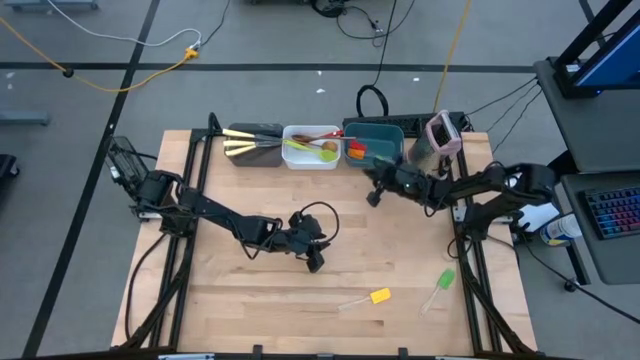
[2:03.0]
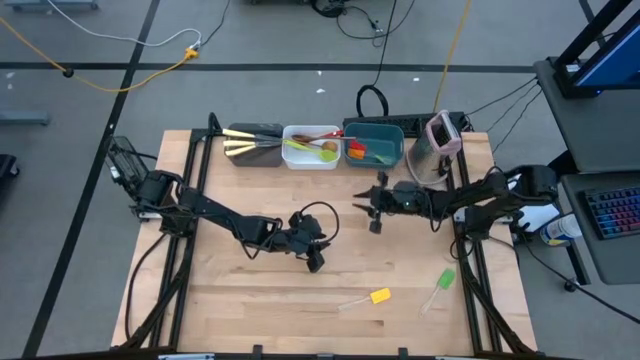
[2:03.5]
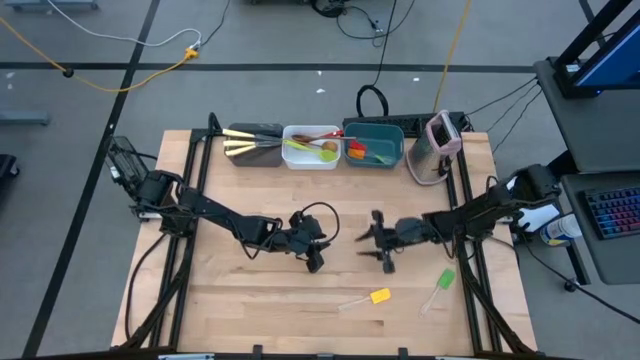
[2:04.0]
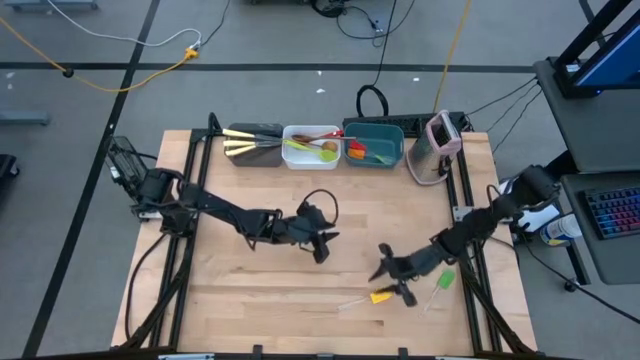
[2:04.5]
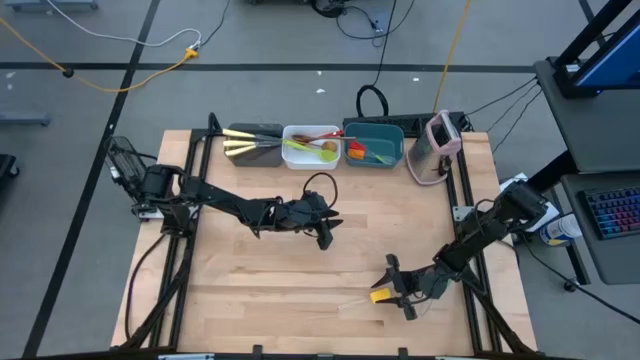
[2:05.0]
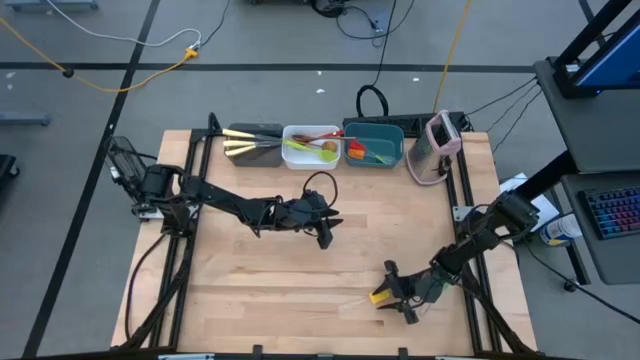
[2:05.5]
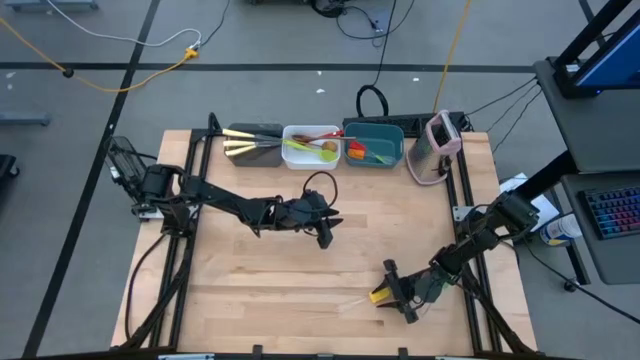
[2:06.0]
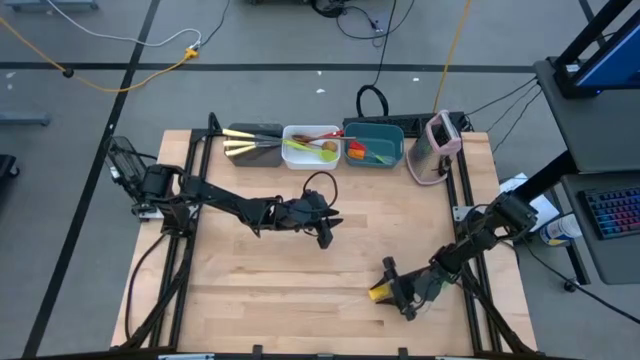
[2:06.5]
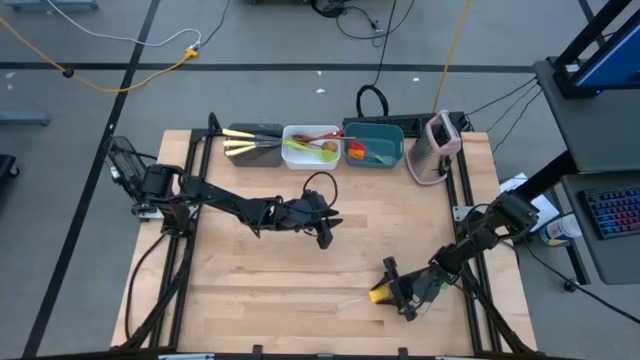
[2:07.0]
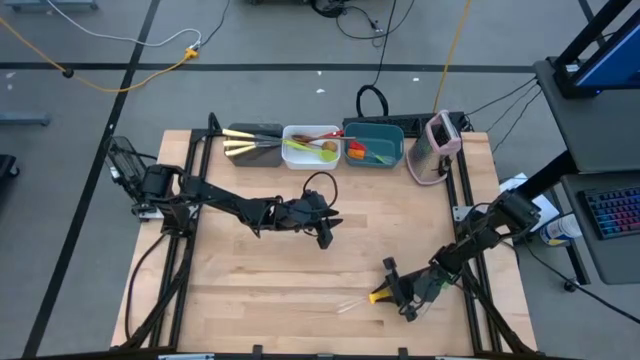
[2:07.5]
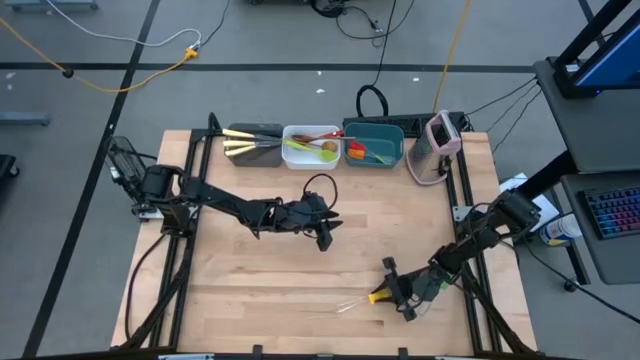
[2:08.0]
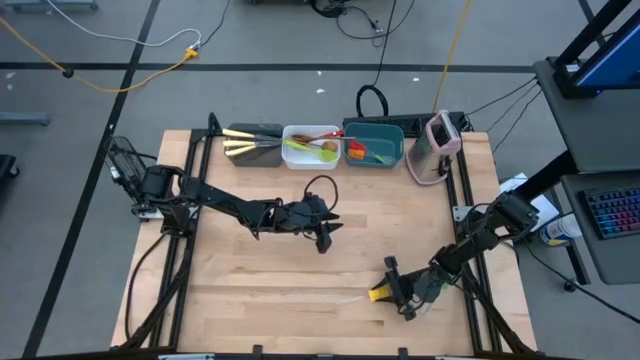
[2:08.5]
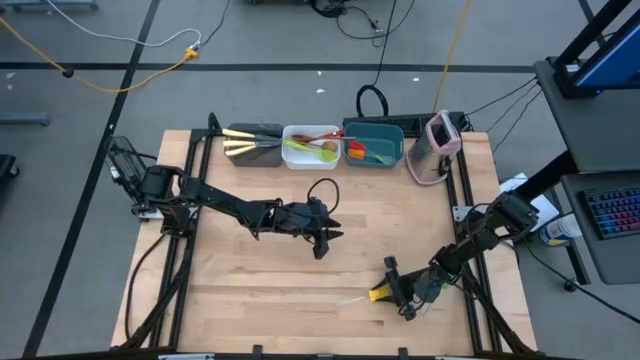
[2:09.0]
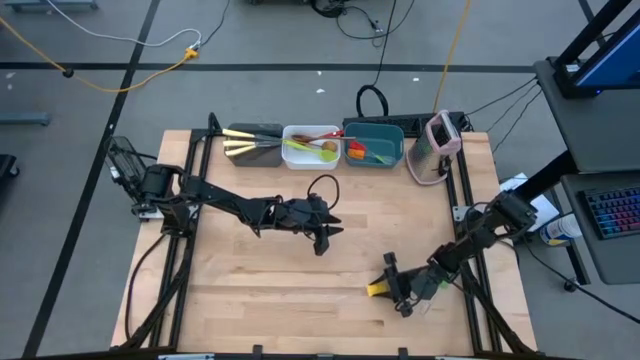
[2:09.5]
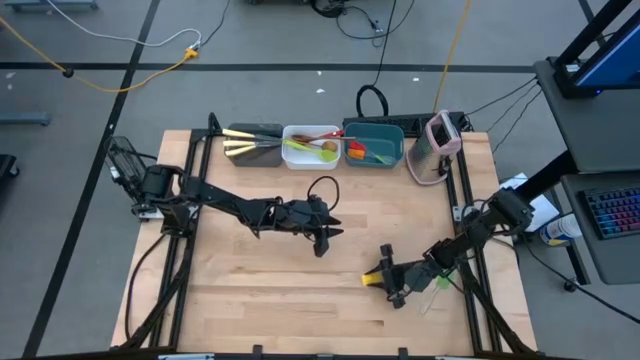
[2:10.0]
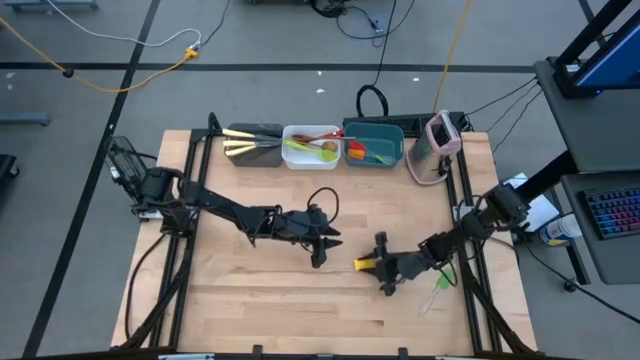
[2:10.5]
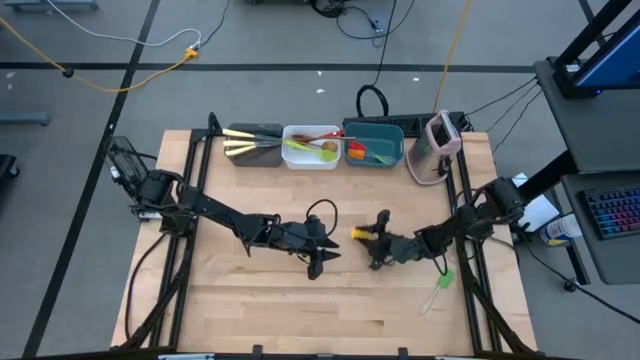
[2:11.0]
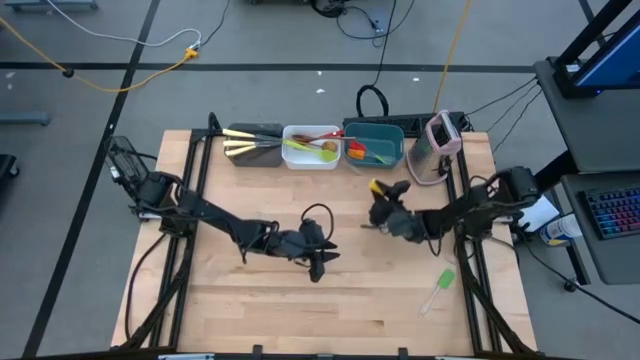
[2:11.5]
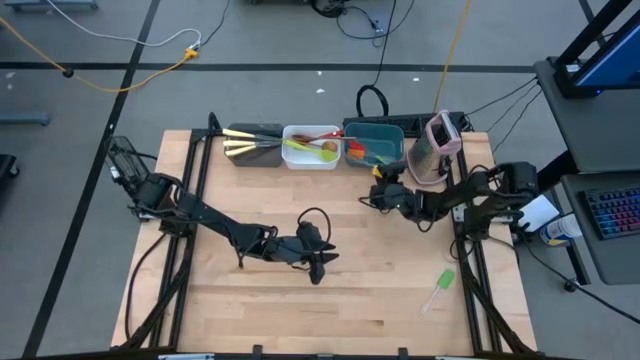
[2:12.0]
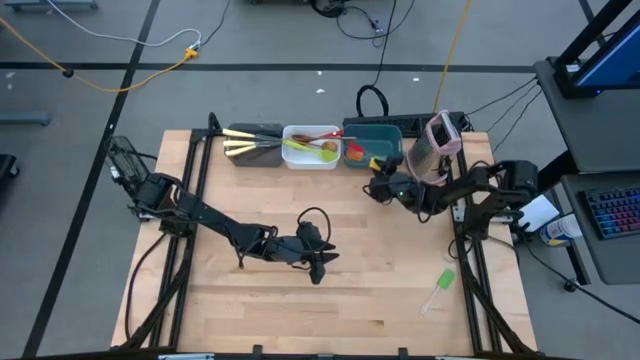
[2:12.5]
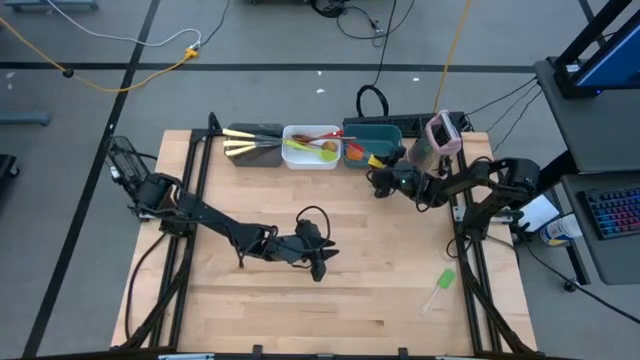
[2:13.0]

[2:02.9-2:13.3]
Task: Pick & Place Kitchen Items
Put the yellow spatula into the blue bin

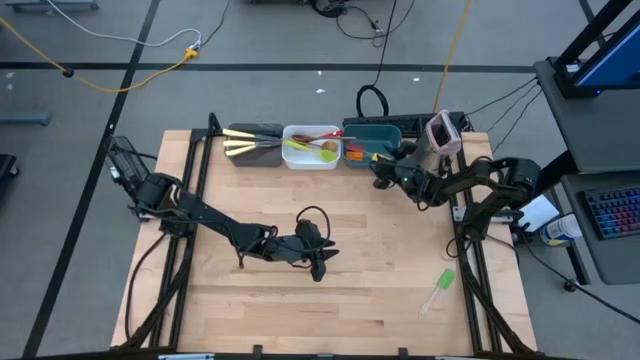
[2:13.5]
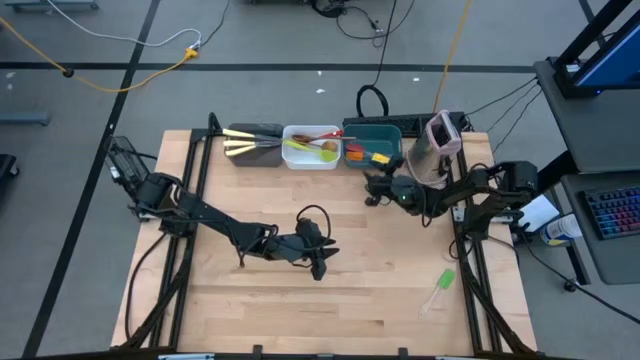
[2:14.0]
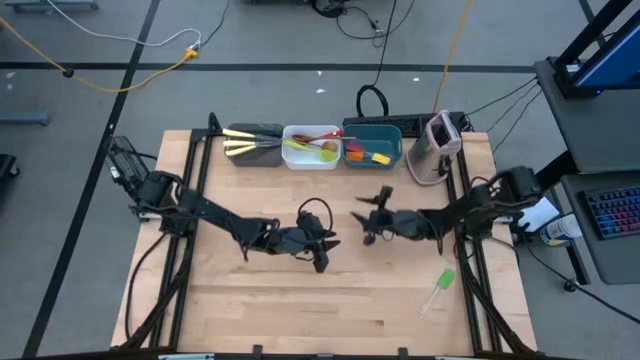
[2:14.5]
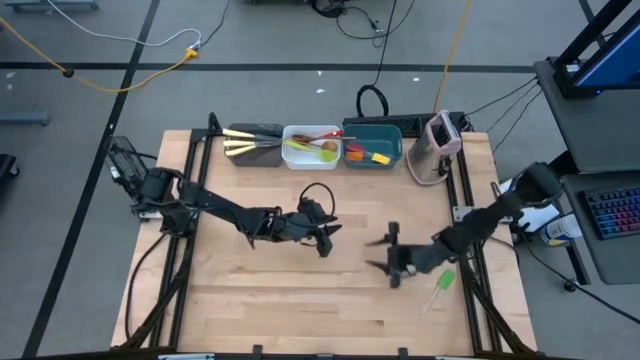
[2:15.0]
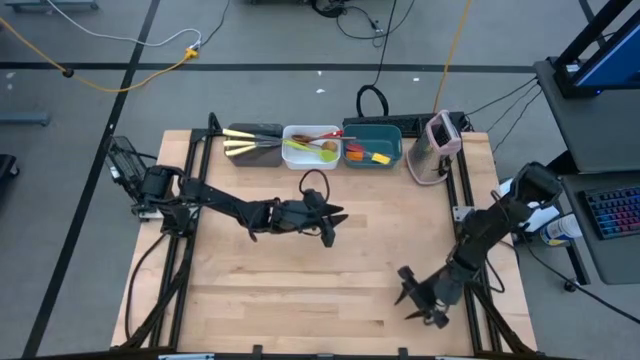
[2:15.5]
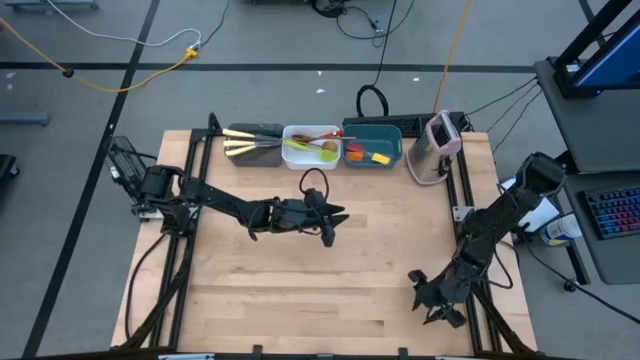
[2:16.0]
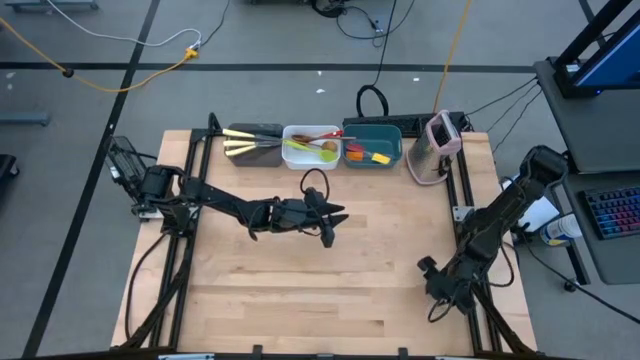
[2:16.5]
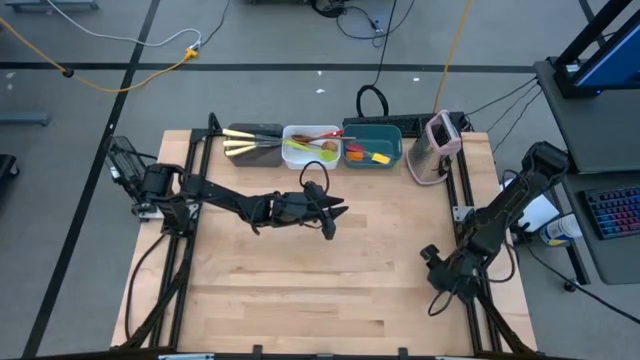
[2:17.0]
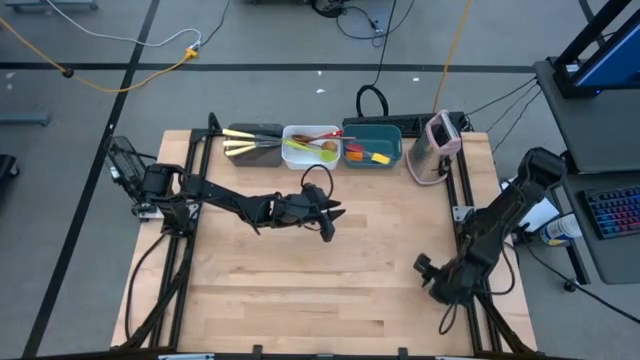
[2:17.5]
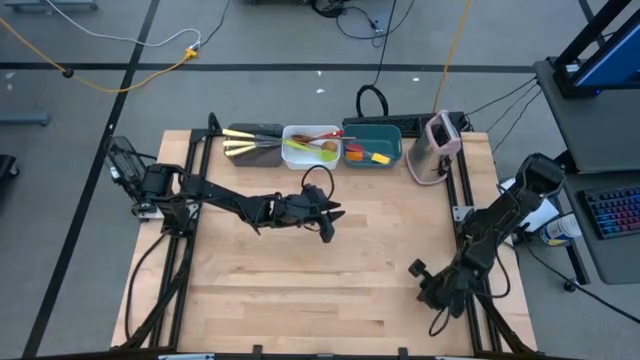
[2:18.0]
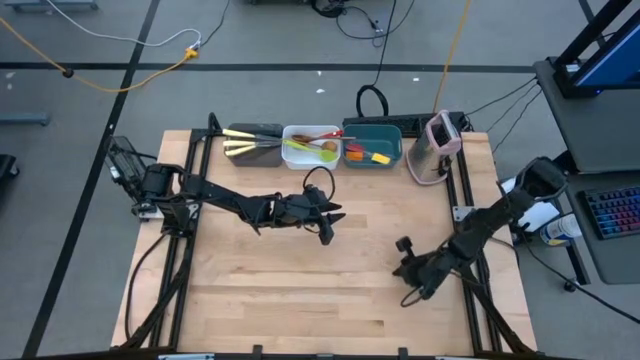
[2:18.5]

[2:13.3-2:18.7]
Put the green spatula into the blue bin

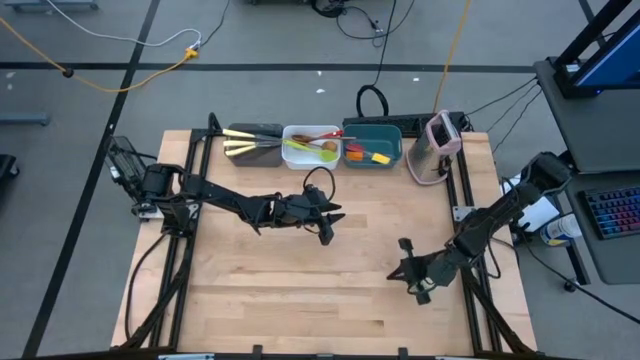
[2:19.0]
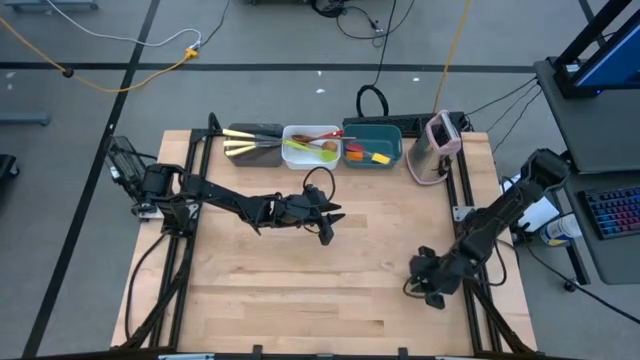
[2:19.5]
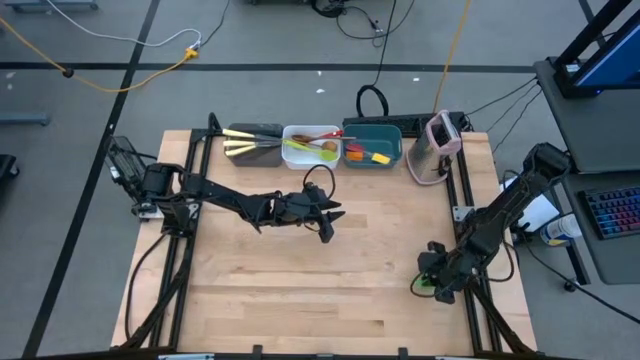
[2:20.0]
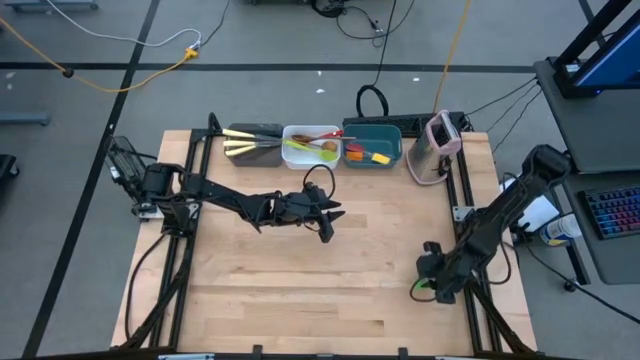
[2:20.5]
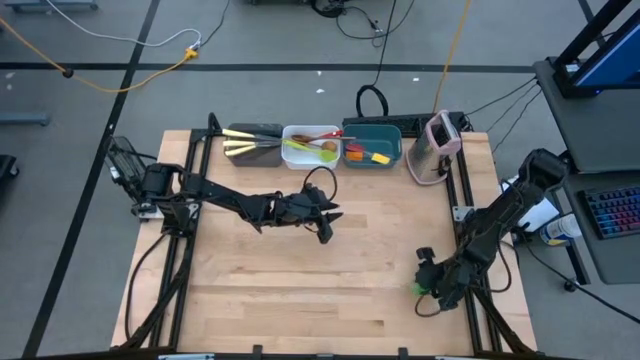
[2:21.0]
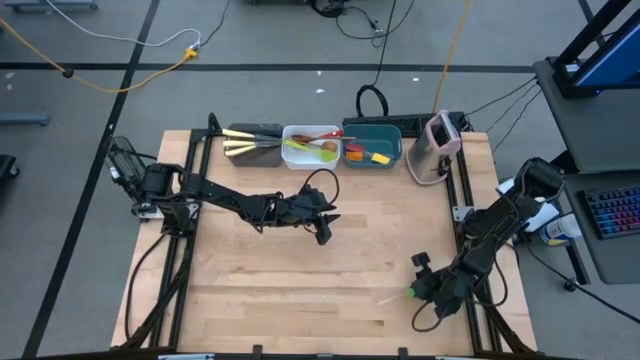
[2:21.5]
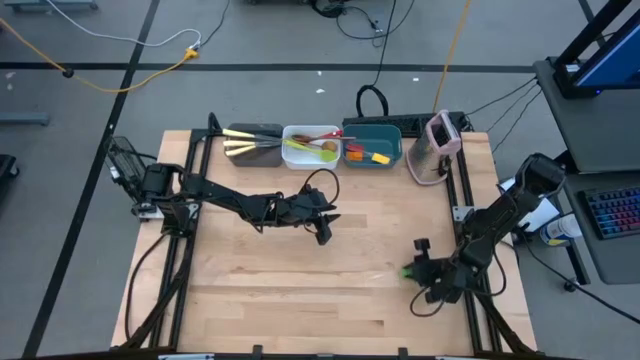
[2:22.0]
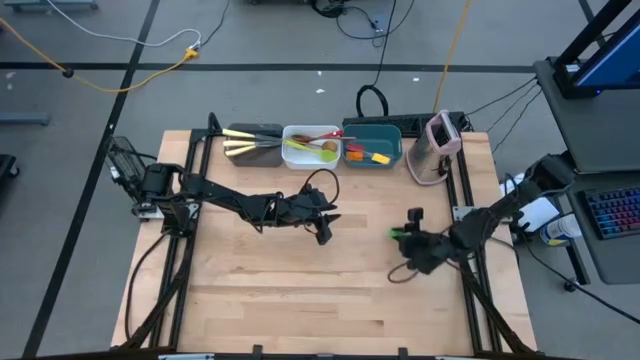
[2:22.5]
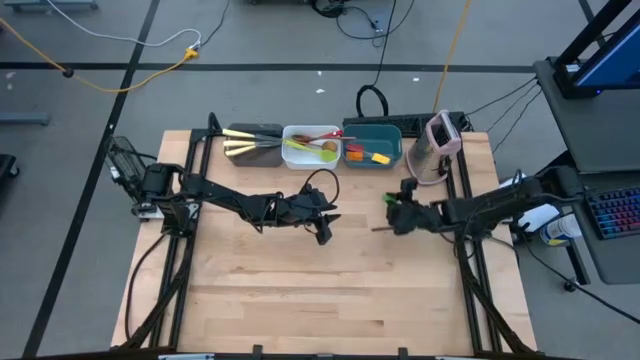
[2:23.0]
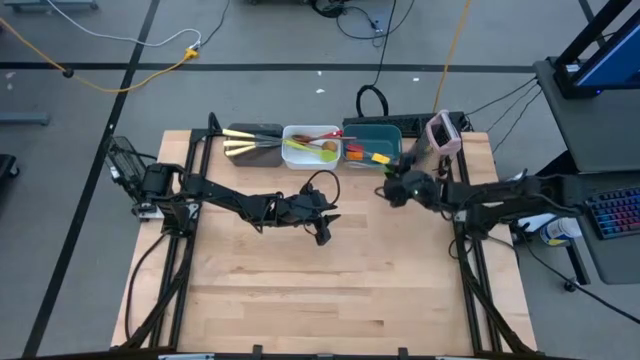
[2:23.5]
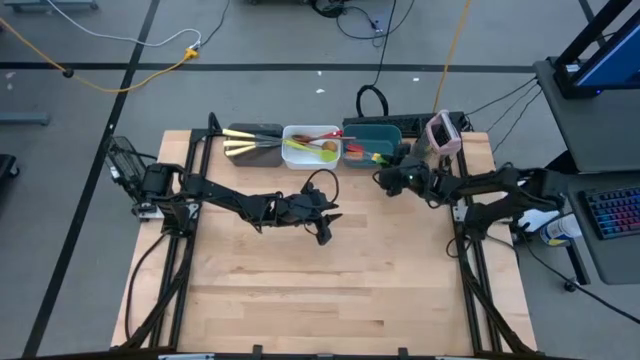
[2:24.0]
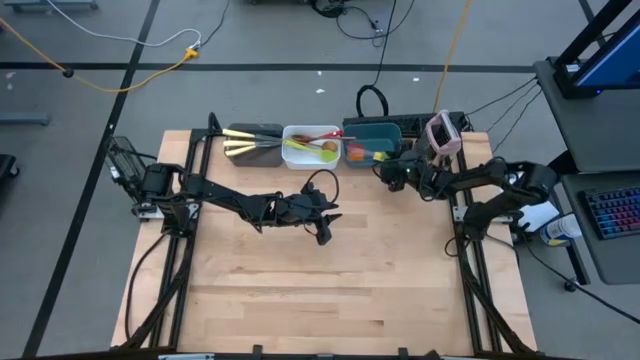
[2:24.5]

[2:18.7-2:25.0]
Put the green spatula into the blue bin
